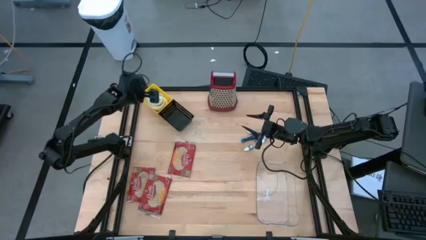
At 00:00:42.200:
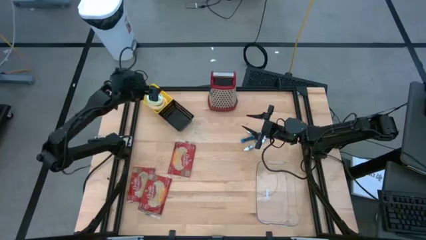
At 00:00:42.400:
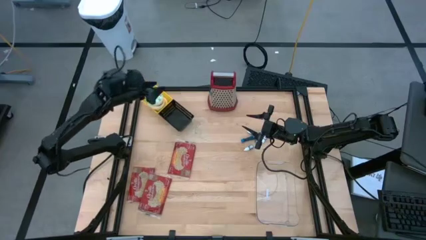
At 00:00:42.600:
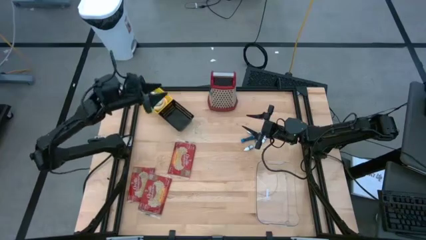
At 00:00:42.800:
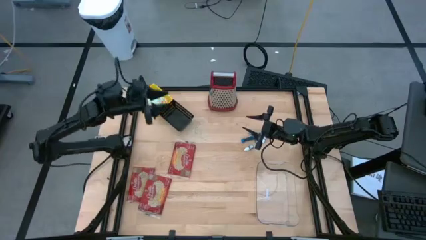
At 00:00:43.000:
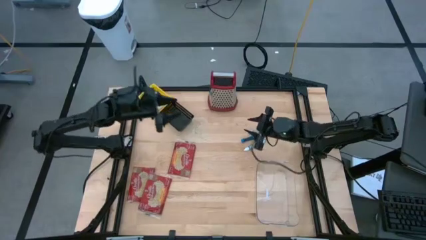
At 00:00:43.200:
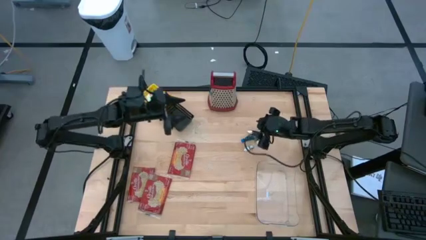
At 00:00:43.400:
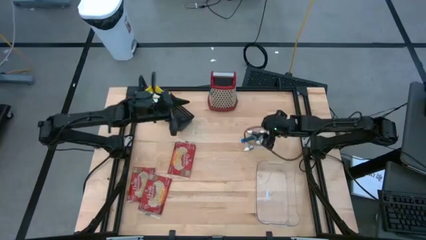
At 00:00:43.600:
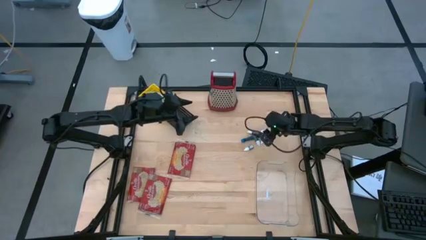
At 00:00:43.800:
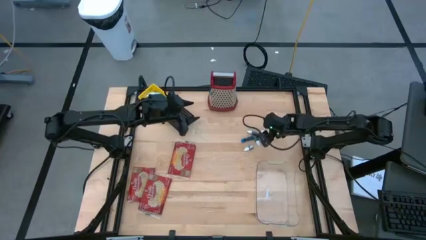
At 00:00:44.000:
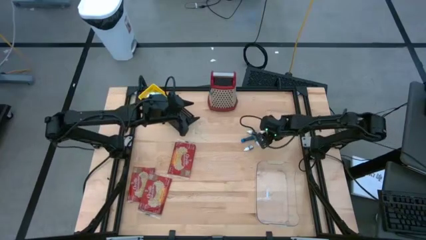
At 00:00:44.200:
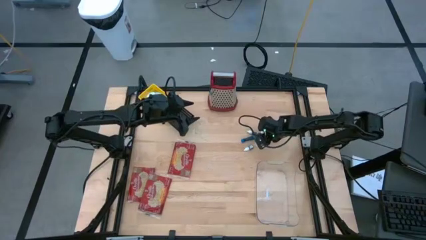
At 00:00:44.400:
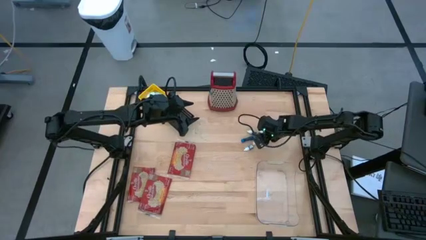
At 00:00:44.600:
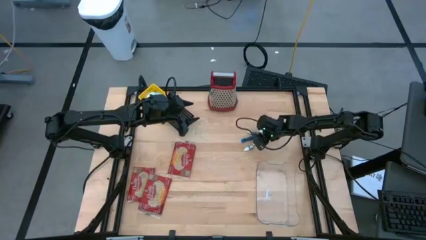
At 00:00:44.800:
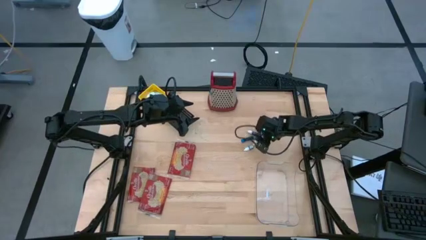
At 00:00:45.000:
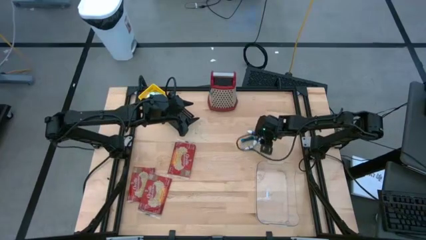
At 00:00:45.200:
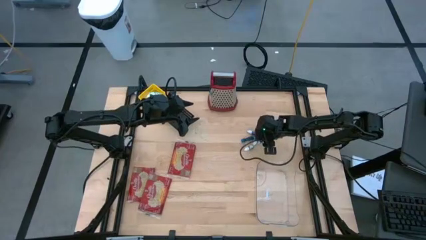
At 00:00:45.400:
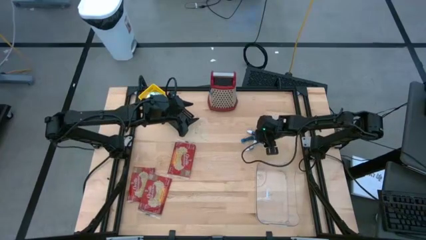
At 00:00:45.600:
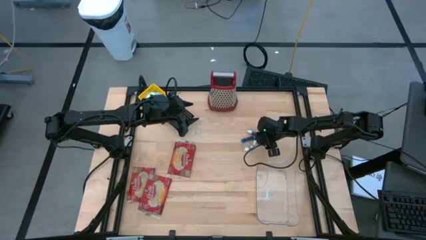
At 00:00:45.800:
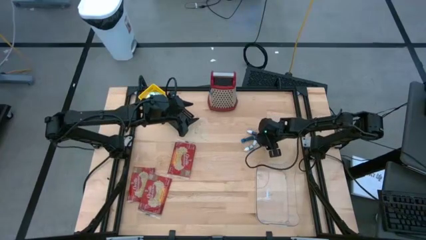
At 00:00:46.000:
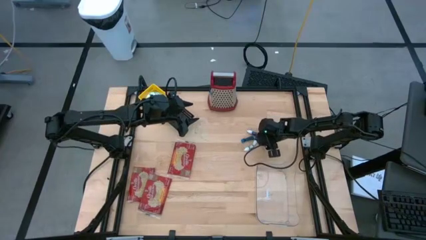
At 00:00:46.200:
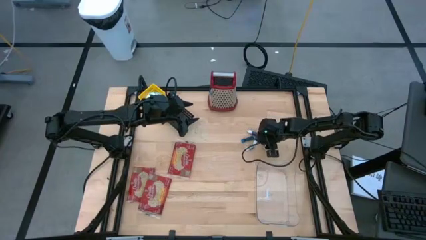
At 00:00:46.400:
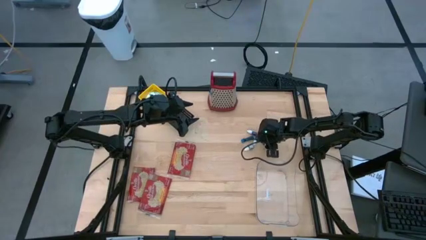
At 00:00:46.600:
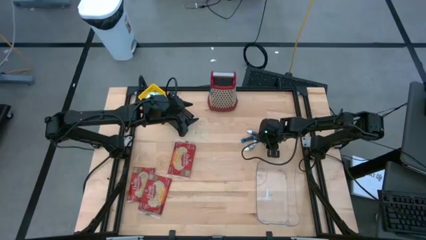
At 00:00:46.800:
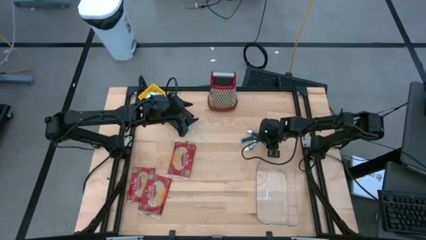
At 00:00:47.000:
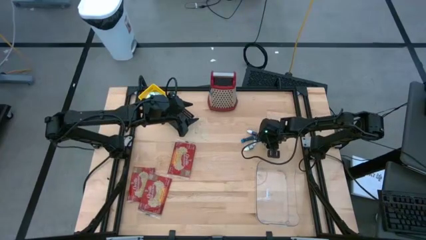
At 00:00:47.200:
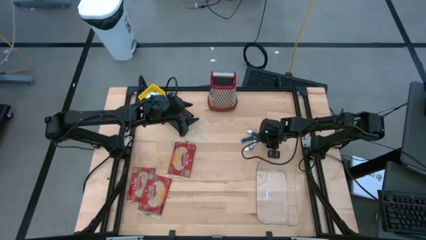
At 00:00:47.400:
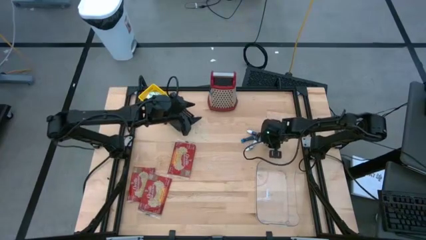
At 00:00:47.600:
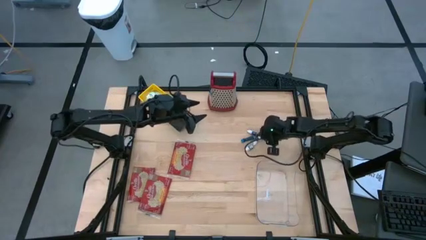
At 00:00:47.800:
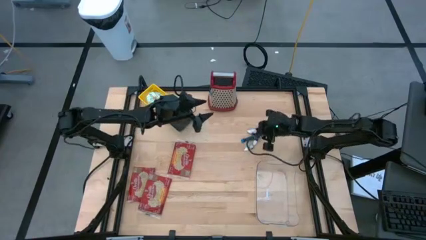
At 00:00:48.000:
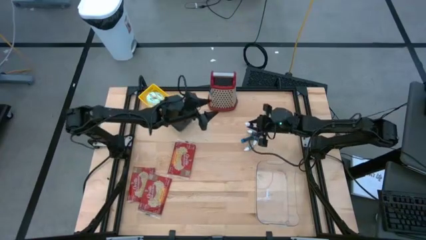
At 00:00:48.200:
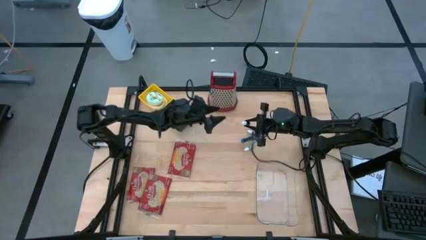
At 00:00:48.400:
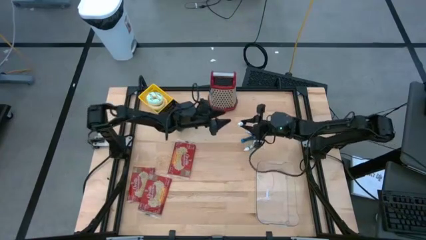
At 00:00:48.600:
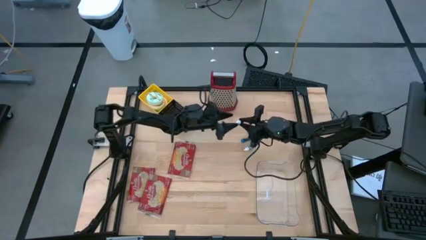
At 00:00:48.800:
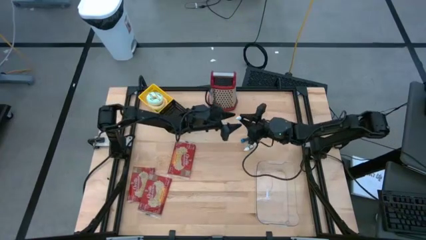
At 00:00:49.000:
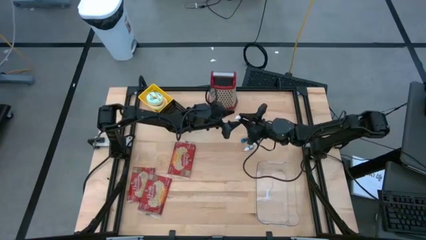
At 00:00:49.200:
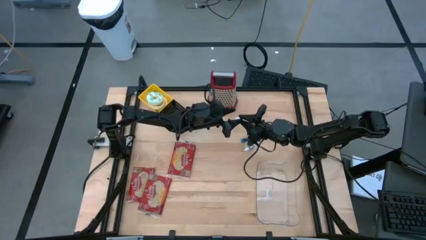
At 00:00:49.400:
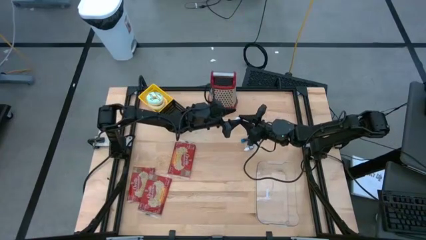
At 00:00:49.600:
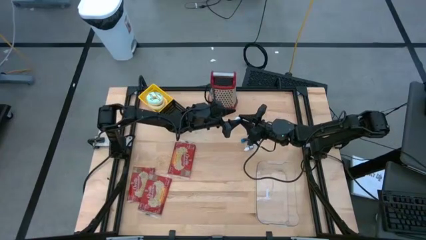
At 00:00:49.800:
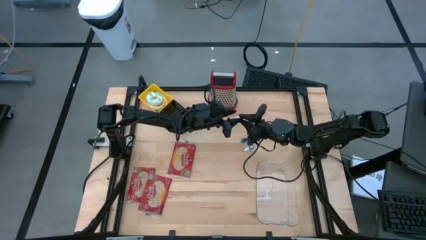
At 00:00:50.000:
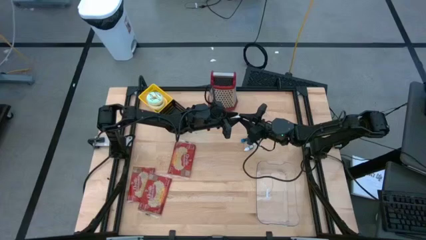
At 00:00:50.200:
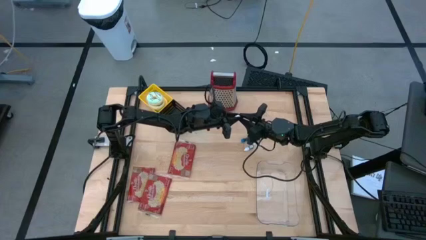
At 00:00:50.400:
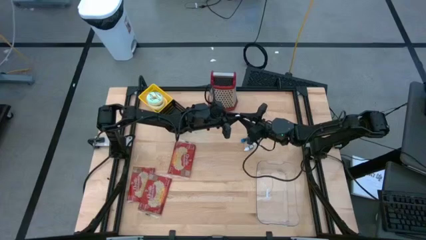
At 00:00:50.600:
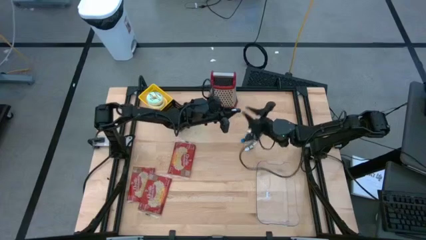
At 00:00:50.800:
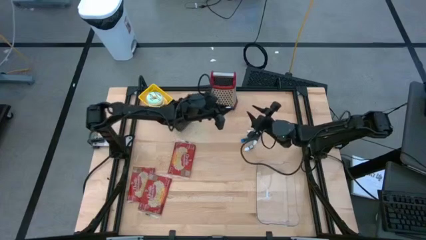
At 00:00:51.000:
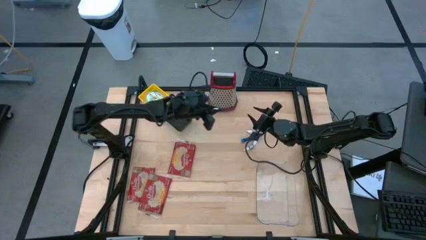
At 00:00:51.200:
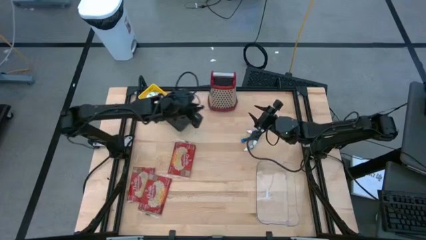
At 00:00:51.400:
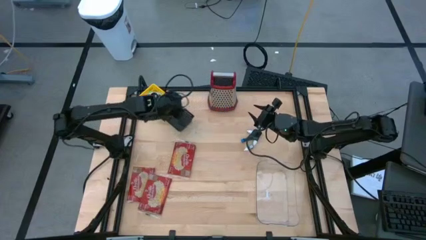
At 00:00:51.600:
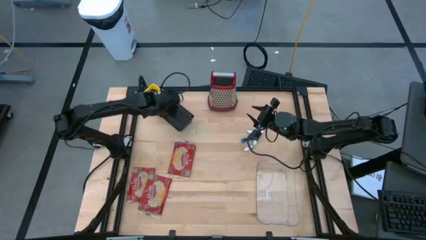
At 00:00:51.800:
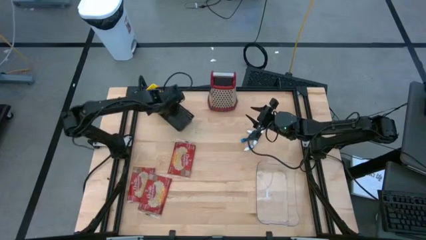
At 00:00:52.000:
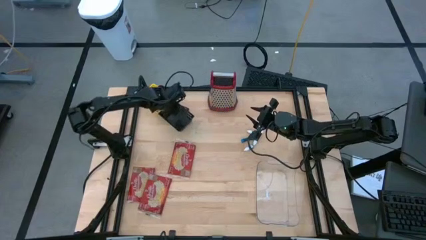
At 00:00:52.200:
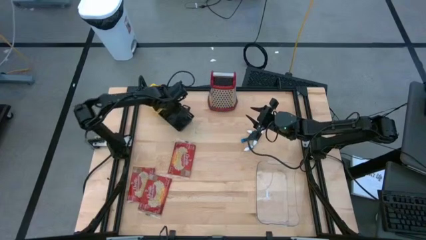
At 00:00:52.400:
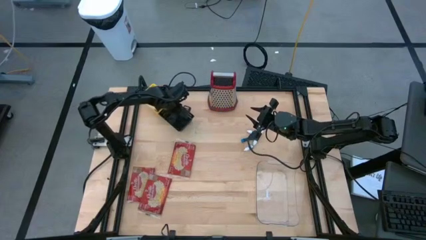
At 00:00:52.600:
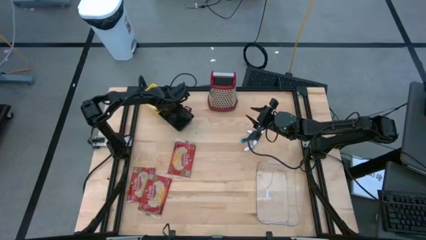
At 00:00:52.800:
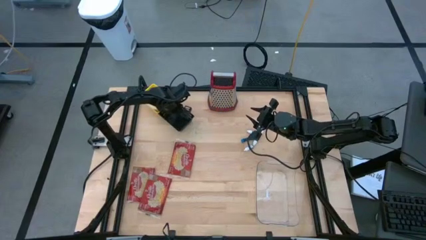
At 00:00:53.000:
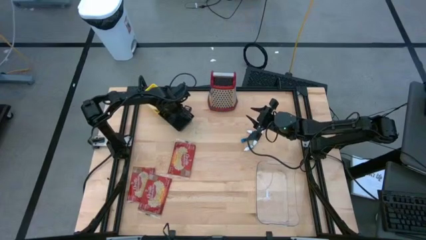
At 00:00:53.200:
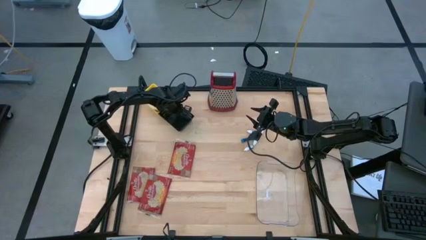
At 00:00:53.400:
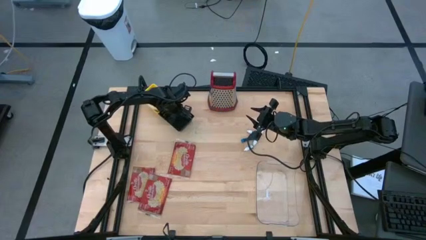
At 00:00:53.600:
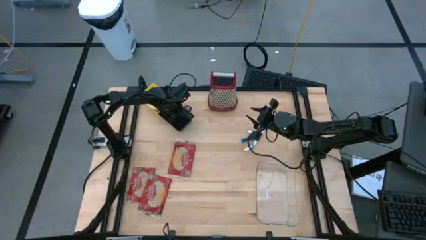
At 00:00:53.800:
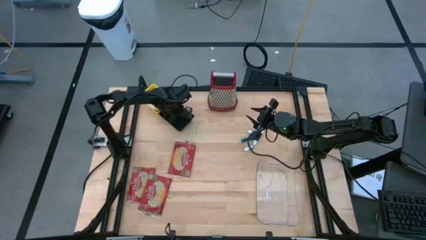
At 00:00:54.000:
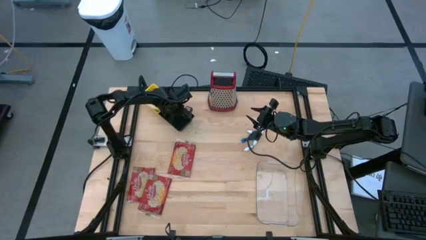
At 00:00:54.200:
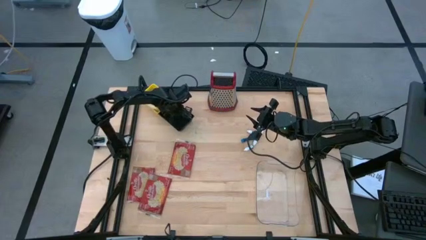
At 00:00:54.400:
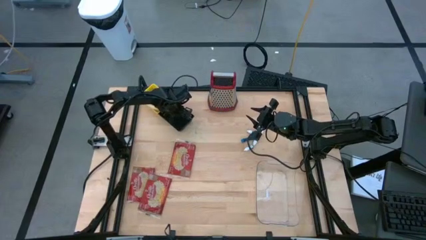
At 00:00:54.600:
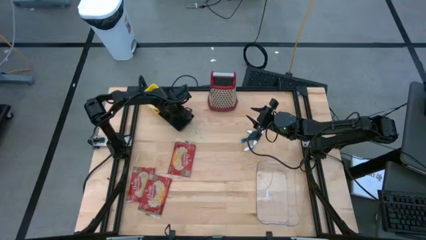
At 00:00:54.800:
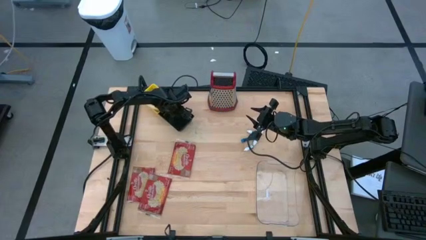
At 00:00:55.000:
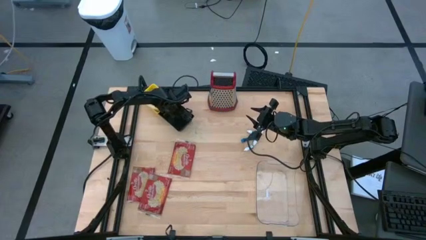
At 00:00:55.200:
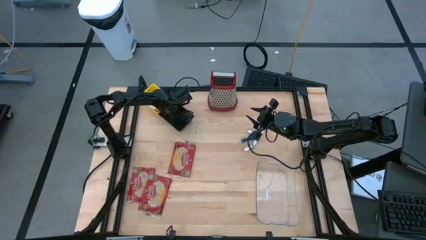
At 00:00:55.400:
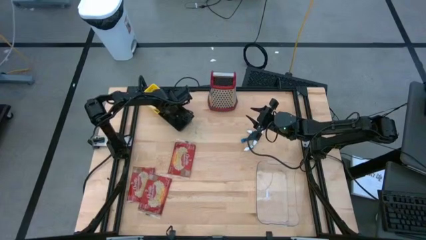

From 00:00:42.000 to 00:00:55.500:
Put the right purple food coloring bottle into the black bin
